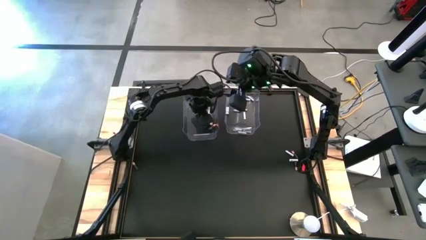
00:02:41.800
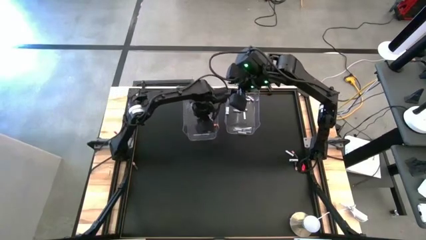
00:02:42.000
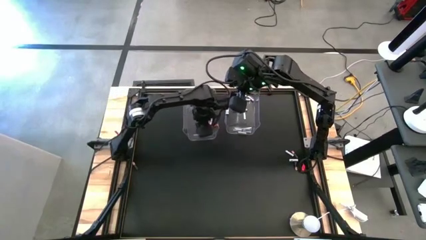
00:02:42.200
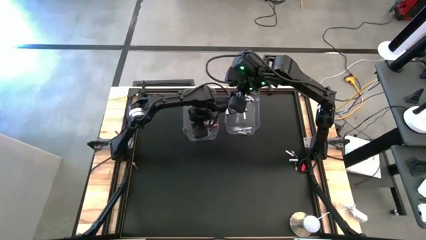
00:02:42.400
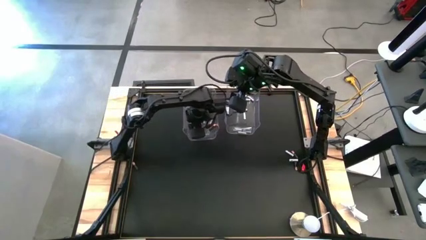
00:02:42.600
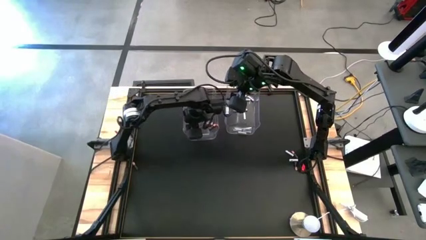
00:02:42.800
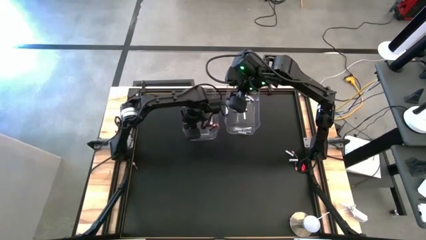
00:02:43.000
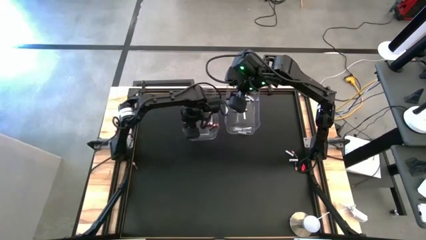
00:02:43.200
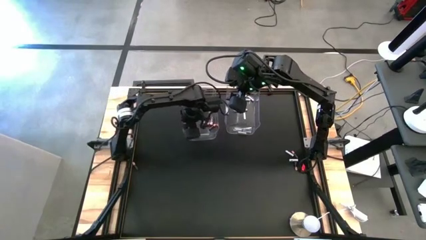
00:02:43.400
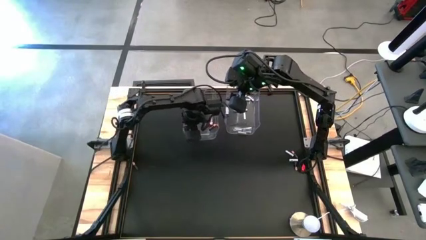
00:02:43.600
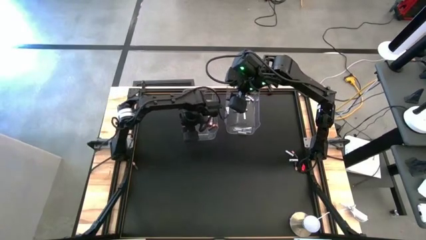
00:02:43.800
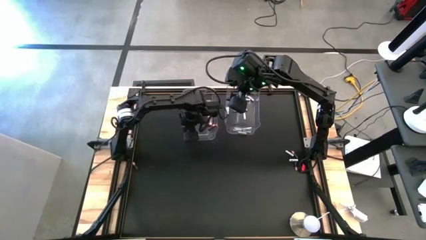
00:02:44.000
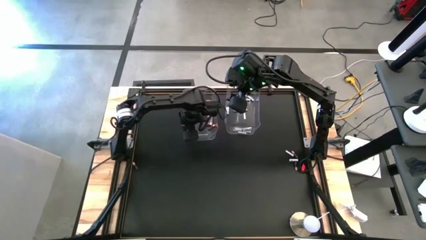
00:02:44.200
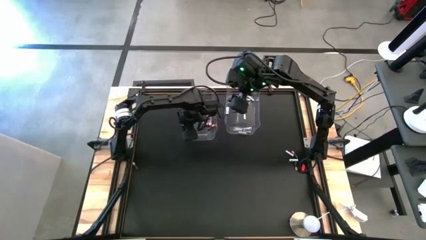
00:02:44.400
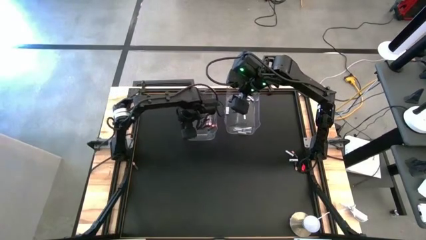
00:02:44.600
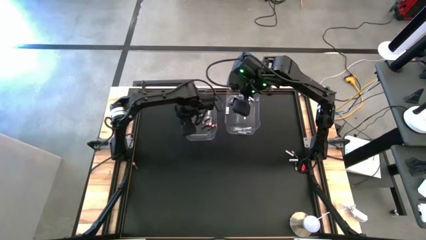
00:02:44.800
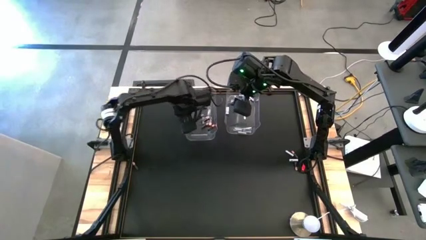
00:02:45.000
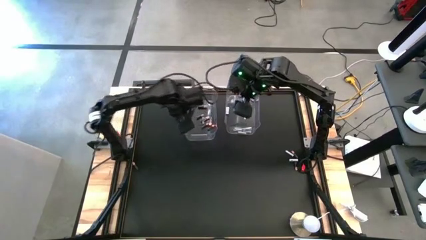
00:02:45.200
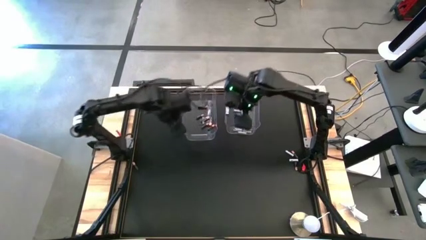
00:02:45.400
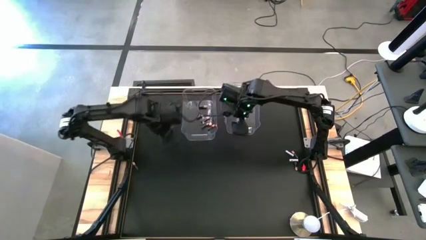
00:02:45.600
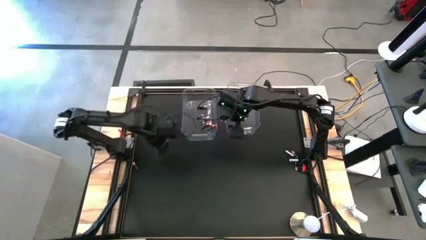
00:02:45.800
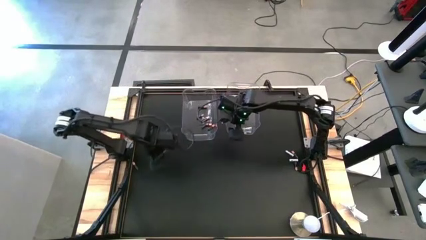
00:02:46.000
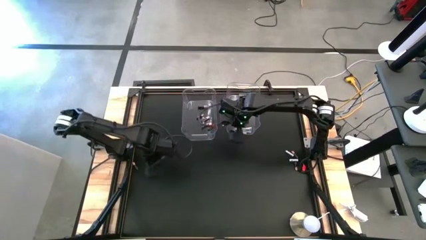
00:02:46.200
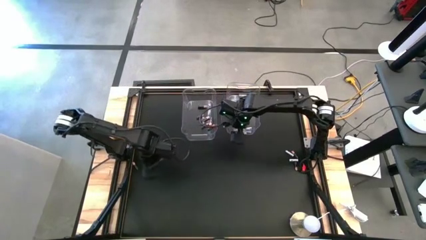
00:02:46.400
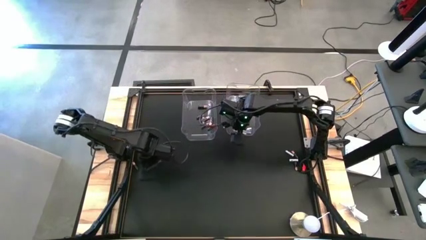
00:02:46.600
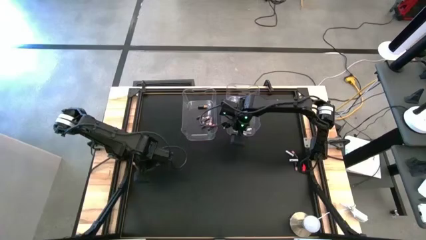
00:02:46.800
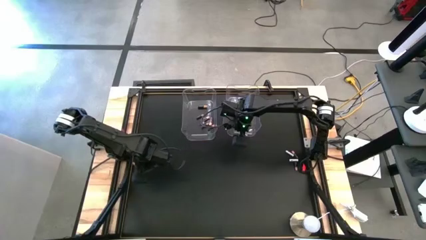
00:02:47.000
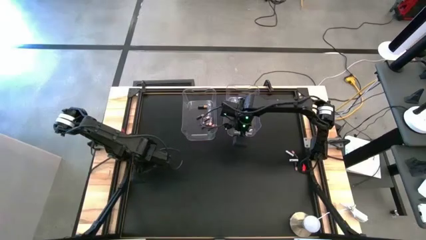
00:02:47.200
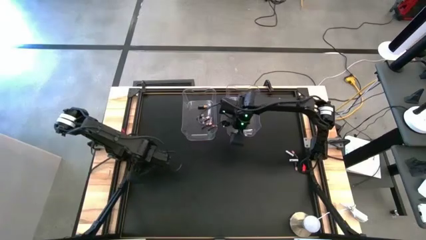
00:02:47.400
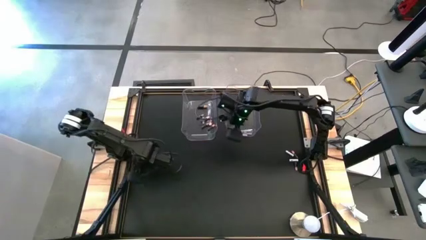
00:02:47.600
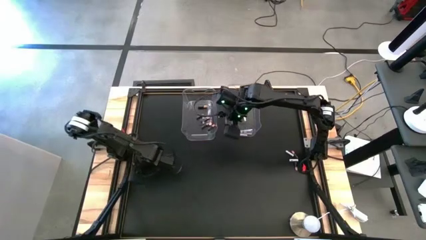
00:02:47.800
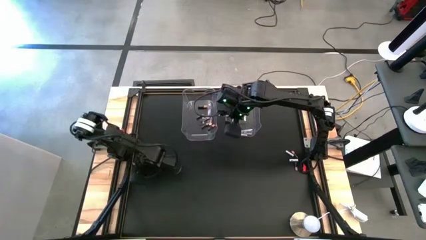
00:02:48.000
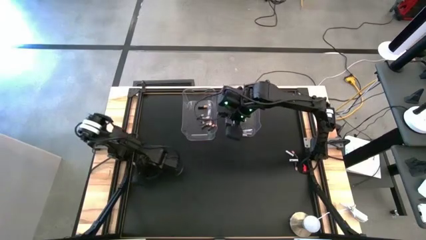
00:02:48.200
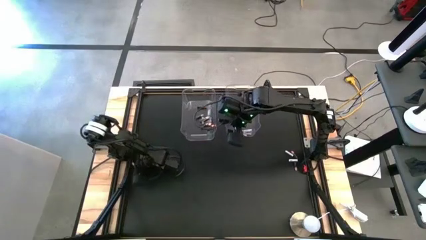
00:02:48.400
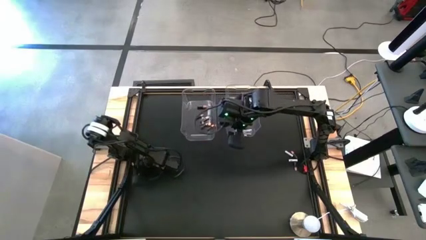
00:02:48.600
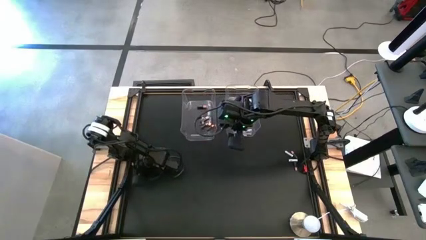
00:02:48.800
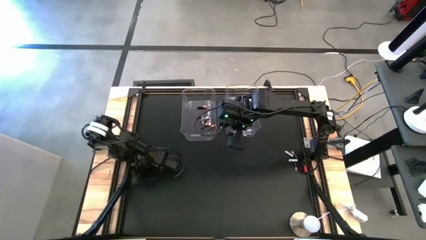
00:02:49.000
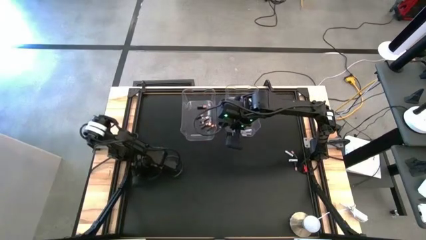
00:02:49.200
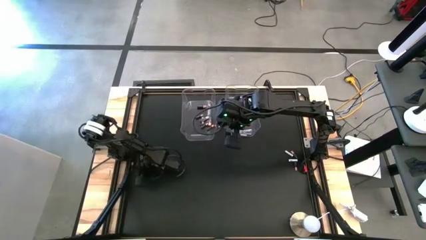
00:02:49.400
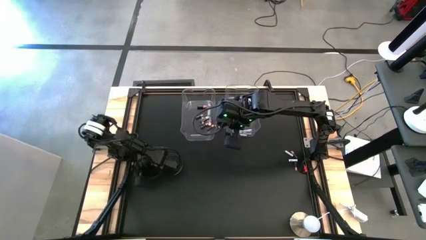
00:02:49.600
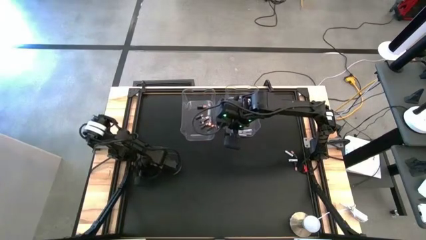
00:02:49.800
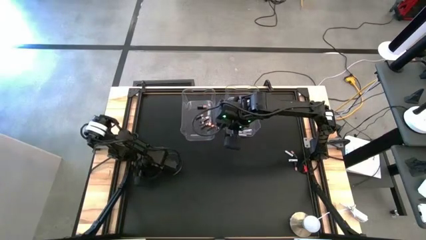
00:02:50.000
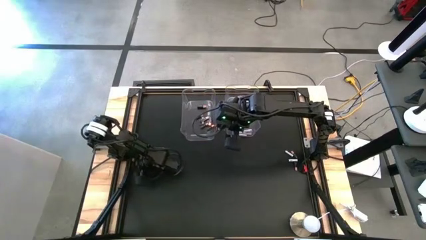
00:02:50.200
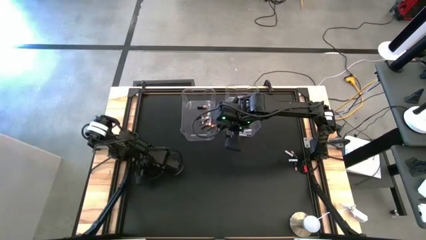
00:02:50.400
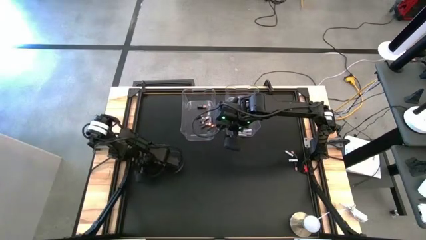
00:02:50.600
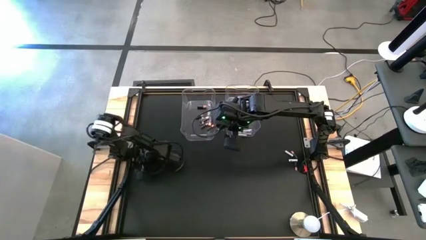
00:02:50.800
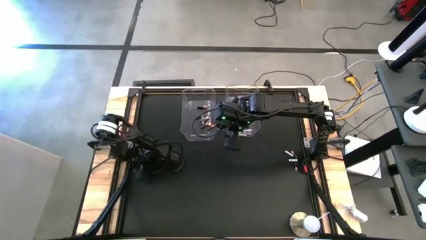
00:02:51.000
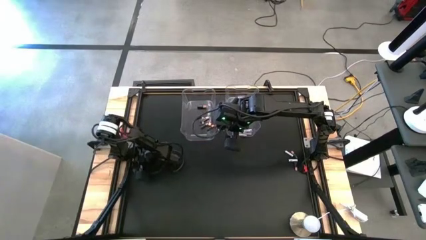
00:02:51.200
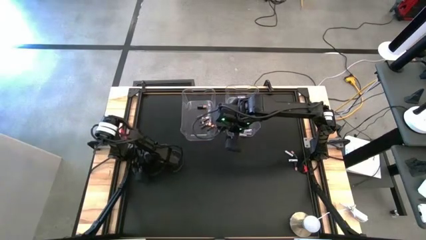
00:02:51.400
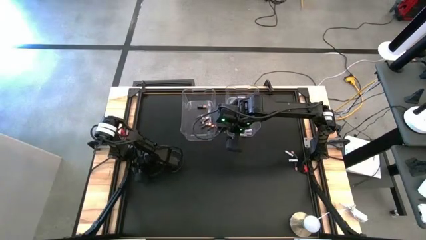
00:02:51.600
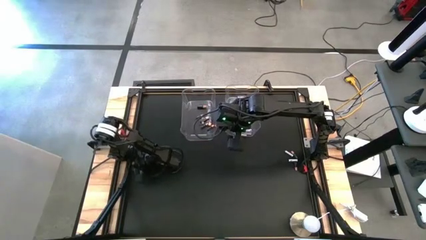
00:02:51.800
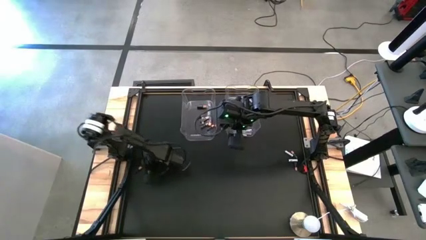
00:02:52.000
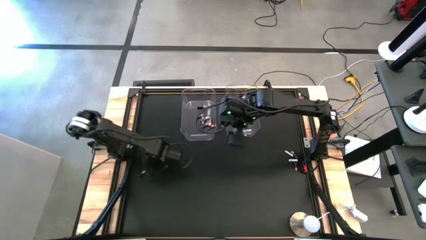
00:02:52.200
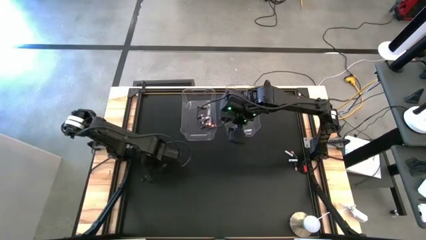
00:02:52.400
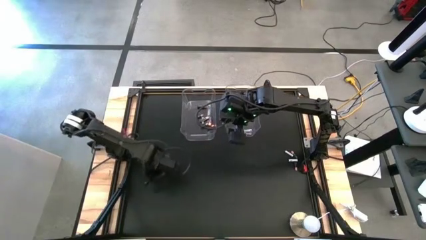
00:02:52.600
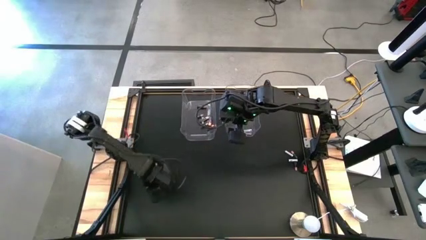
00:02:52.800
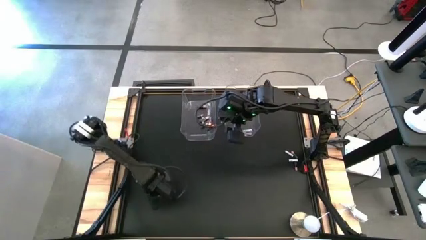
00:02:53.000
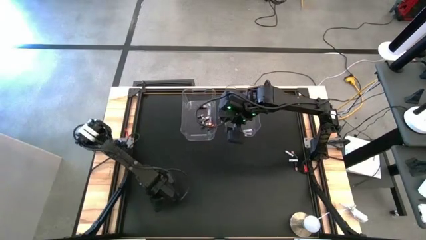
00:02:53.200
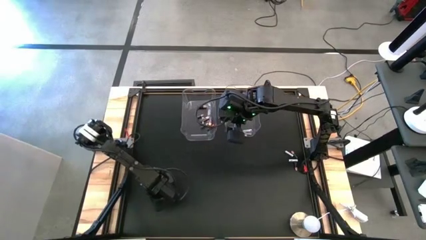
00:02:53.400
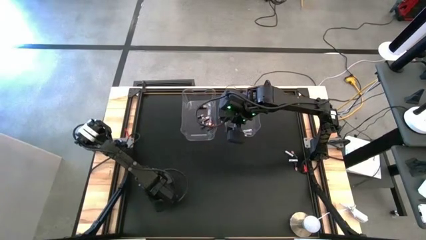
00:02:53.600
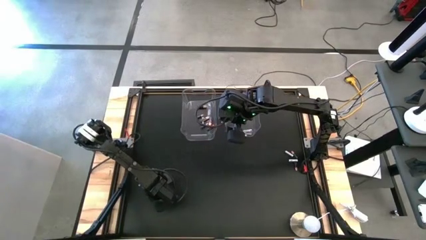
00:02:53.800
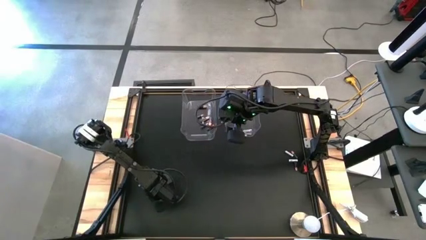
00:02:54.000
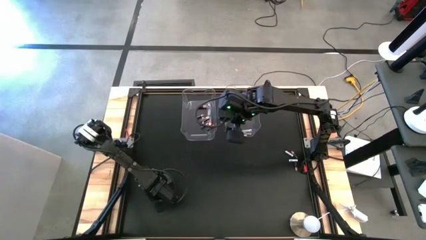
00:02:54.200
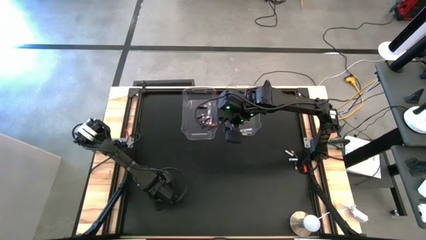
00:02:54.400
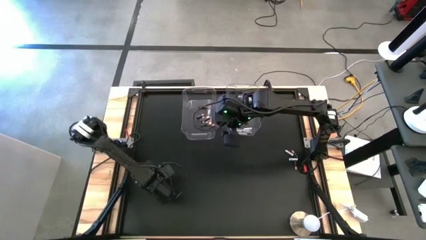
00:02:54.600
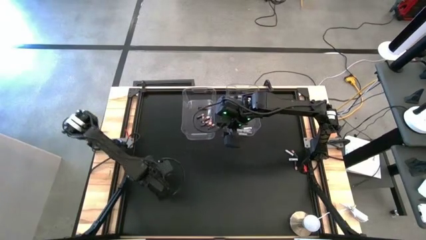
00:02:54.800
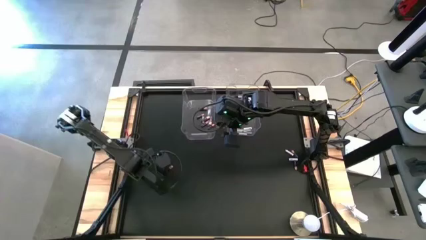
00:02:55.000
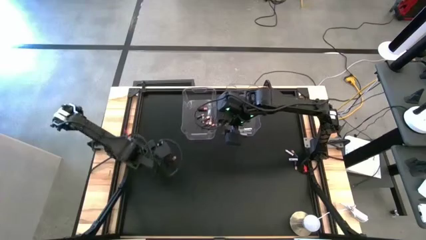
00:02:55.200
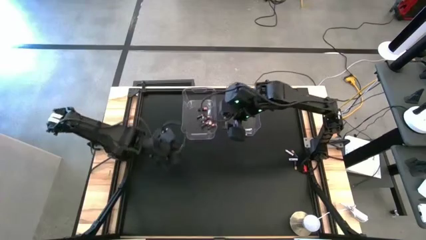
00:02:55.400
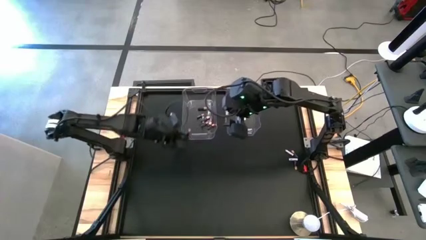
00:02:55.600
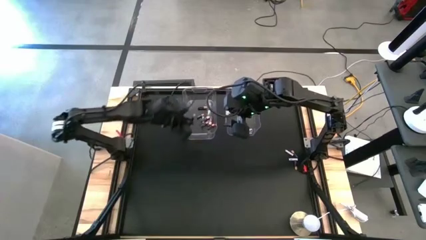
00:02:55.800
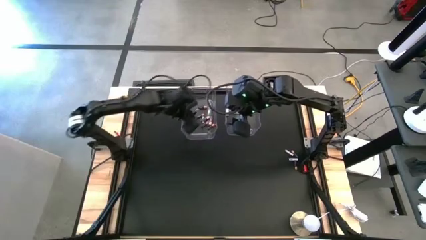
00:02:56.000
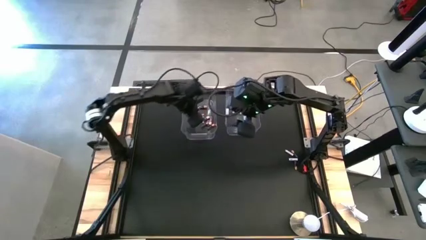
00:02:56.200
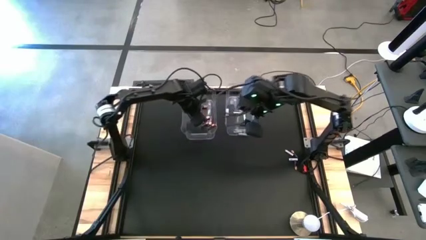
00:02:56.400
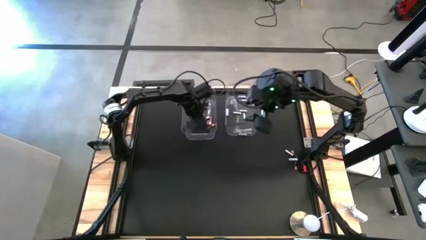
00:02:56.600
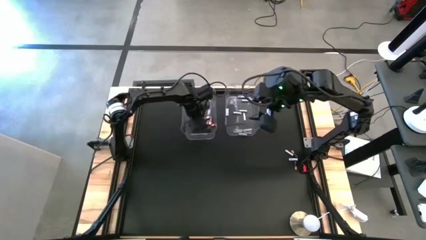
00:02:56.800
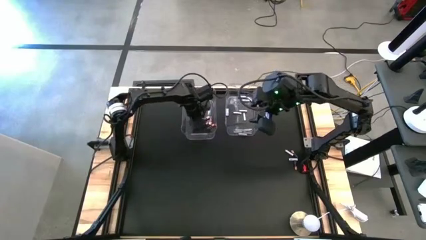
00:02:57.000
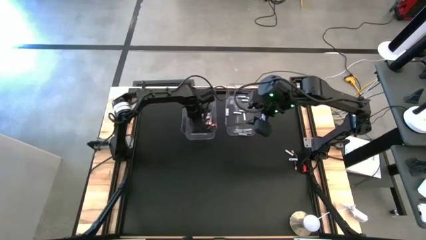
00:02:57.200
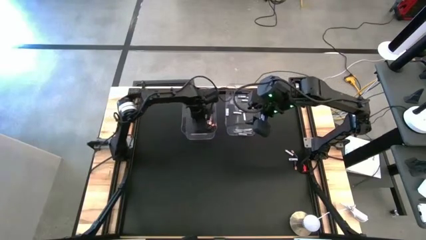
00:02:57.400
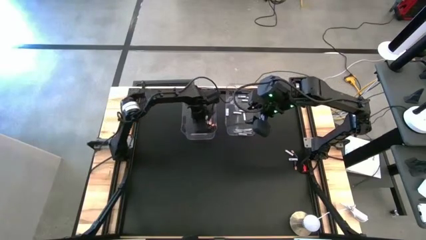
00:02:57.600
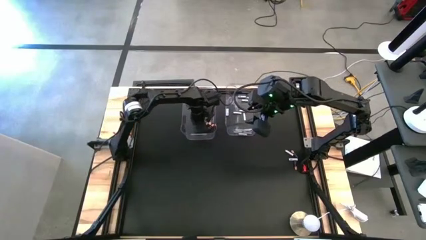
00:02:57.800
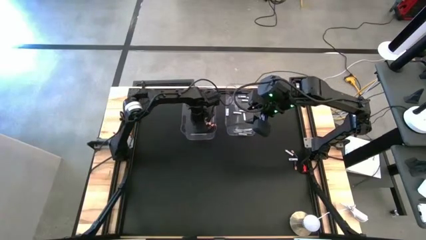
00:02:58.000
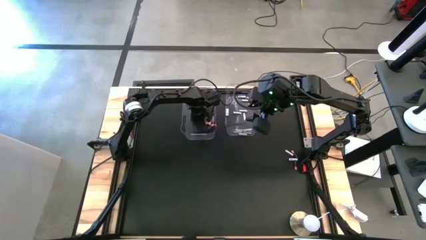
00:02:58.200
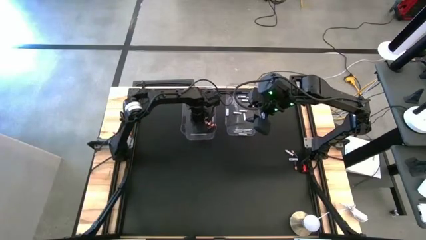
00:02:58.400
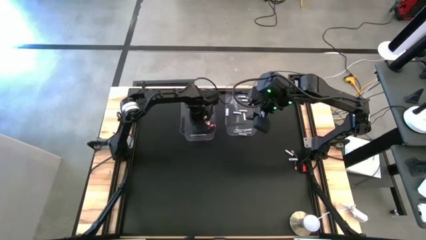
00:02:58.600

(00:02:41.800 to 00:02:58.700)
Task: Sort batteries
Put the black battery into the left transparent bin
